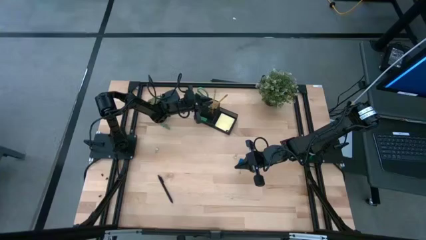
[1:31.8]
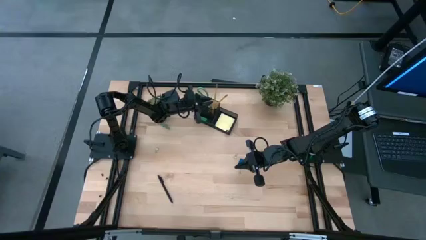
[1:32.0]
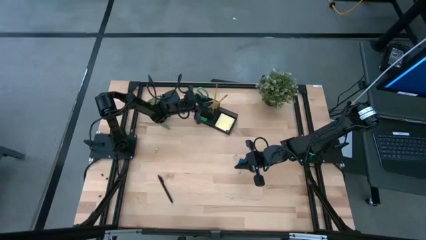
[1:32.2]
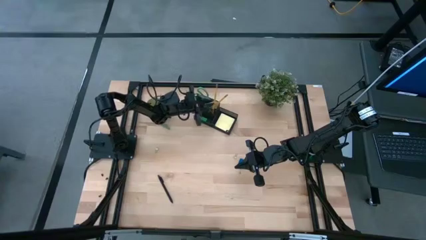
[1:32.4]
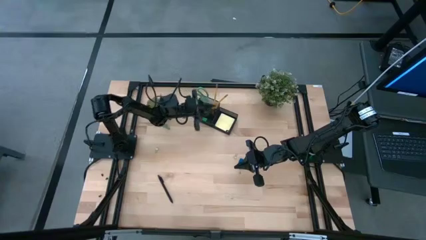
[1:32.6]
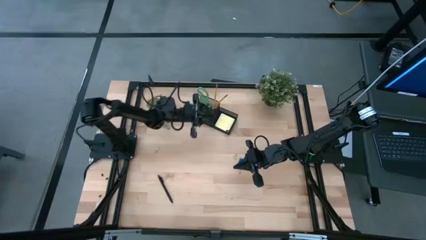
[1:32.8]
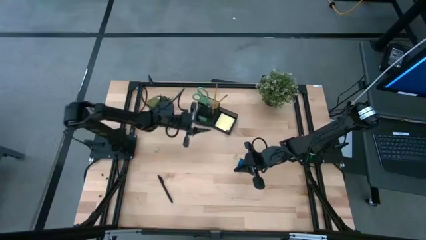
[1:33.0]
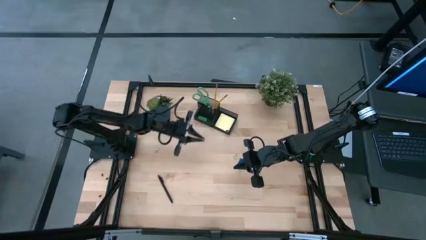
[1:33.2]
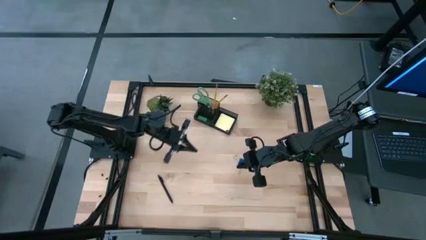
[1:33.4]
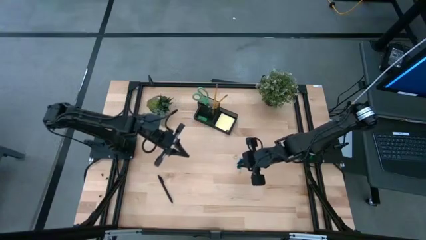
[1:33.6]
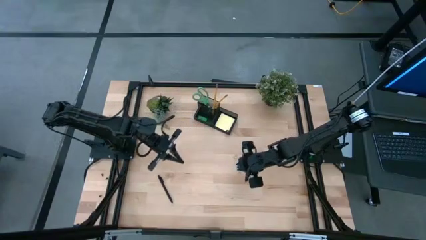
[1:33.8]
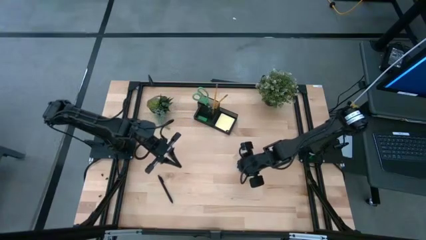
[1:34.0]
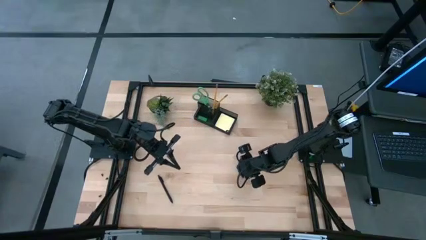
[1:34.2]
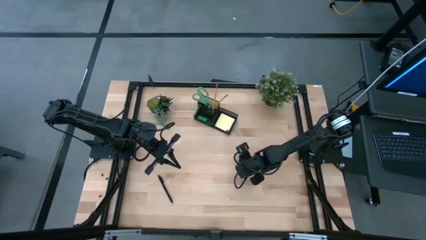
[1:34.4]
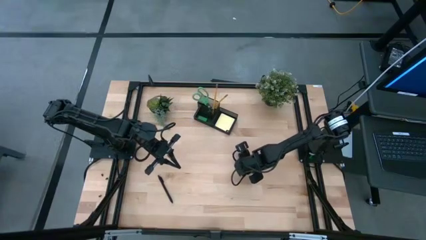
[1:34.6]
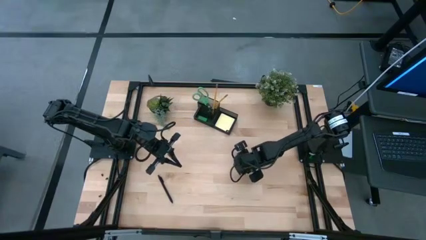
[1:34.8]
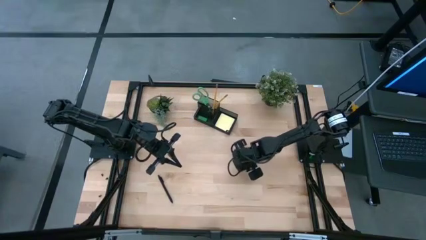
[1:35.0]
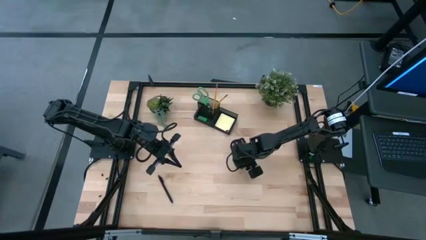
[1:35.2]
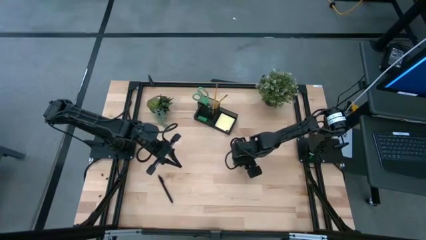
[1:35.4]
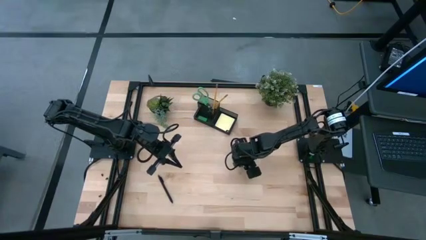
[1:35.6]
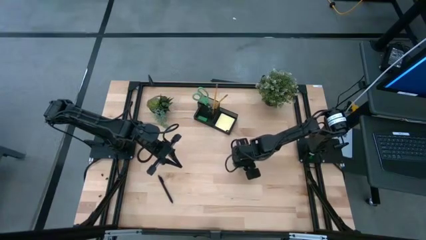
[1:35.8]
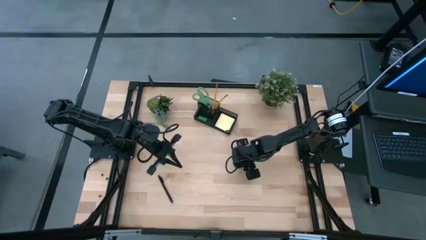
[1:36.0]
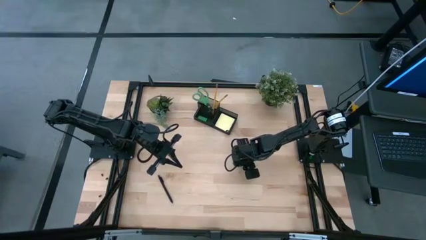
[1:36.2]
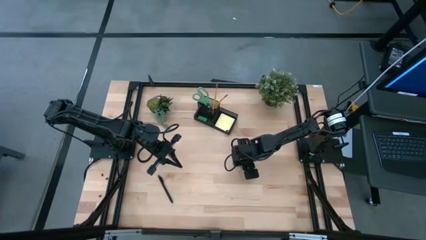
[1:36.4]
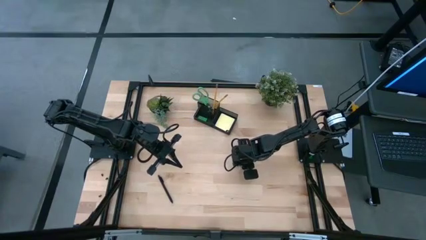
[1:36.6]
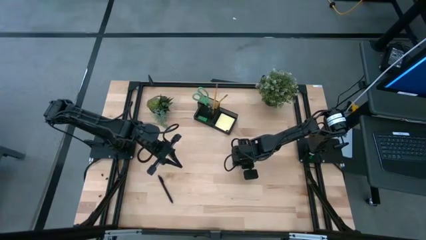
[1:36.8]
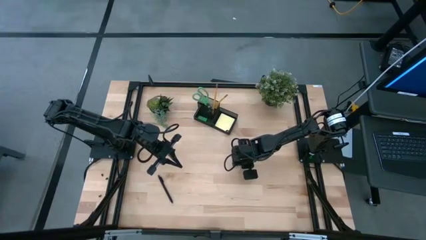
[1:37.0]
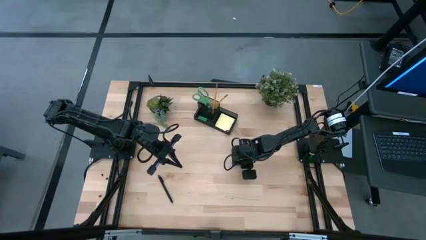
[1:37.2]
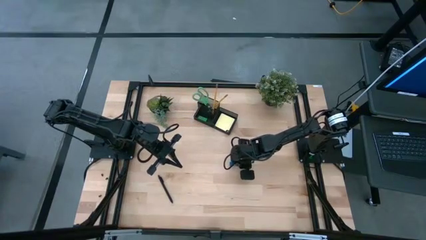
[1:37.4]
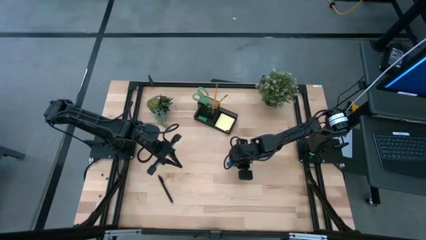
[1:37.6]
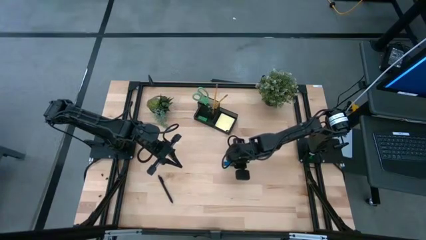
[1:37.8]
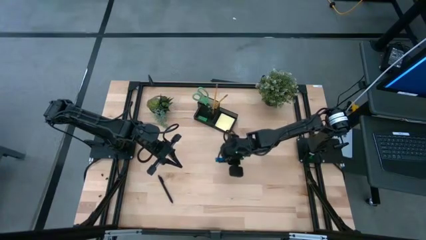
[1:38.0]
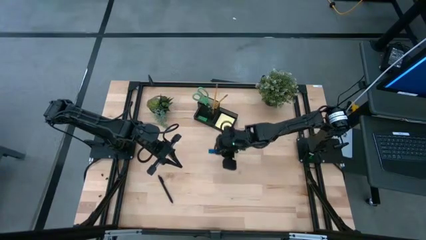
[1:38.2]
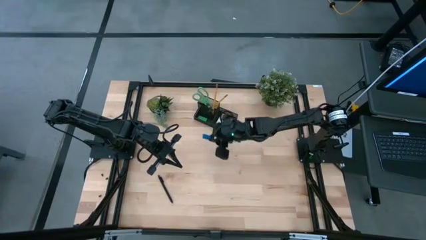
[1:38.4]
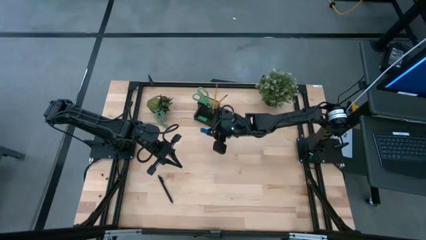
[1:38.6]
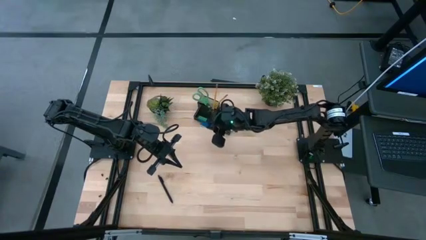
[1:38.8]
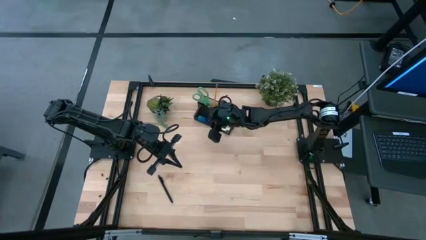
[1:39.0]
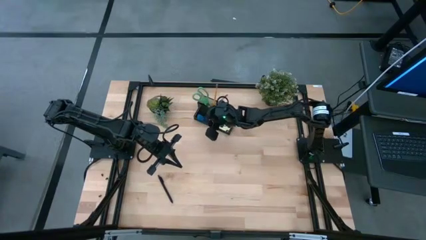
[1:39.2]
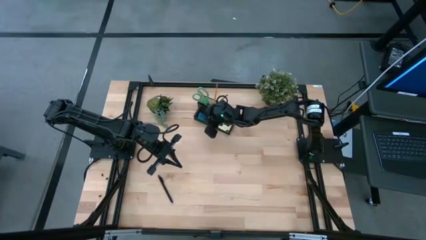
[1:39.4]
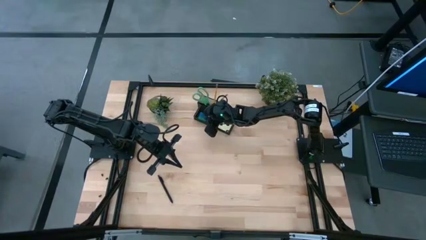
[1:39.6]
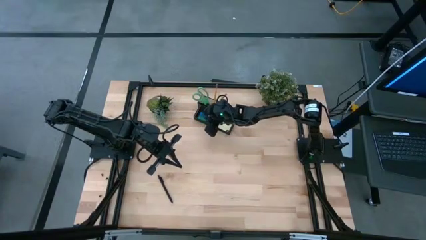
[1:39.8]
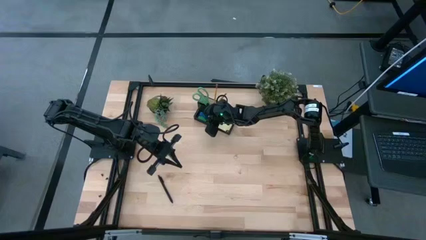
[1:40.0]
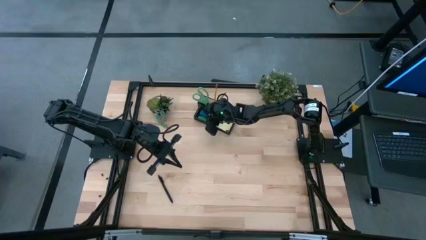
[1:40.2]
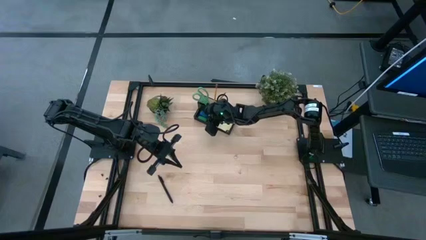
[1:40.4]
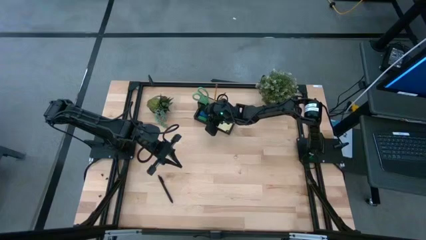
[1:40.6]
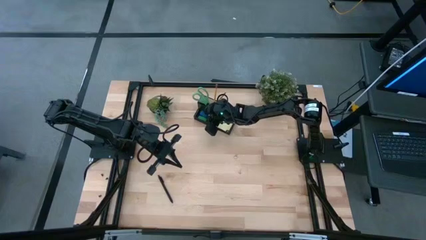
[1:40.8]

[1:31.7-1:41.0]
Task: Pick and place office supplies into organizer
Put the blue eraser into the desk organizer

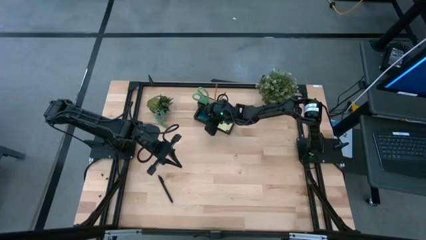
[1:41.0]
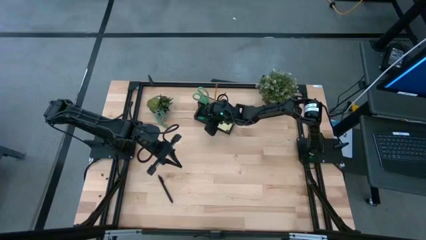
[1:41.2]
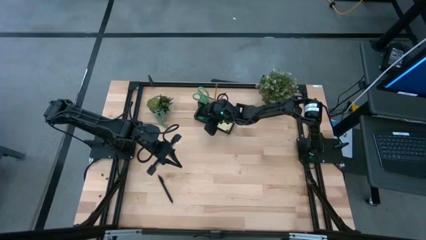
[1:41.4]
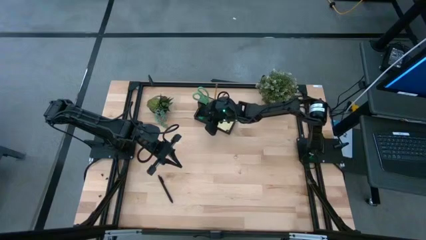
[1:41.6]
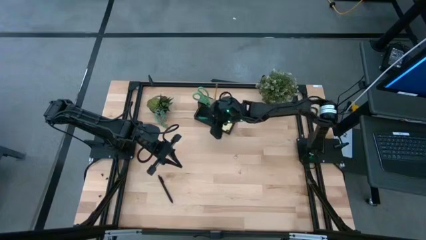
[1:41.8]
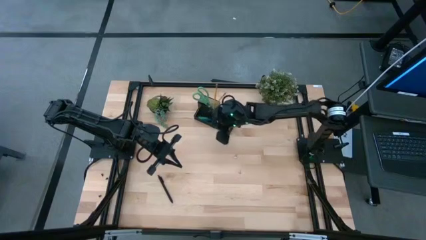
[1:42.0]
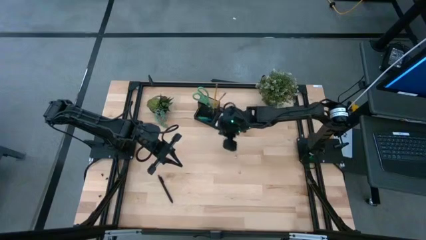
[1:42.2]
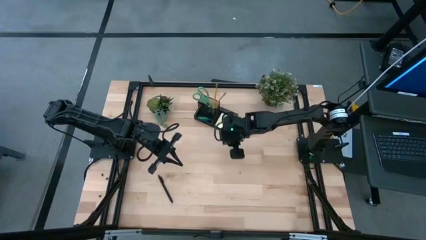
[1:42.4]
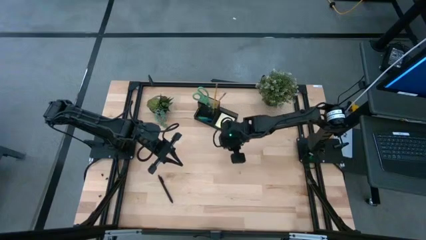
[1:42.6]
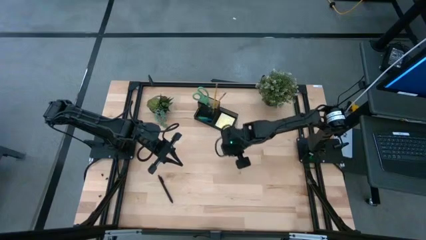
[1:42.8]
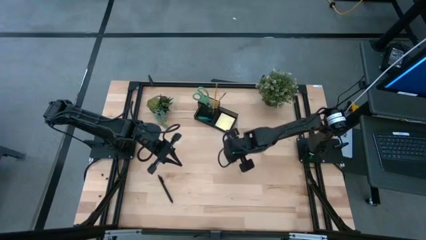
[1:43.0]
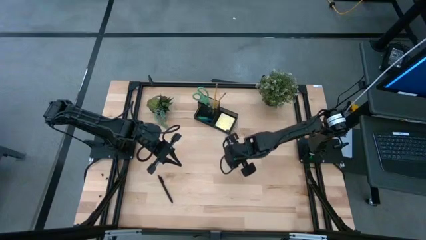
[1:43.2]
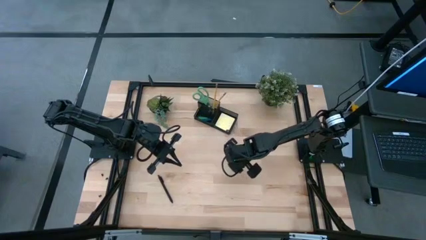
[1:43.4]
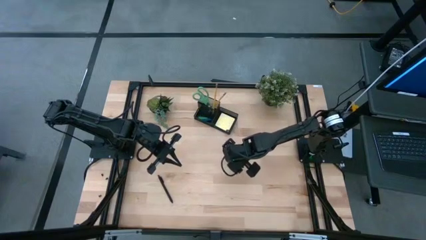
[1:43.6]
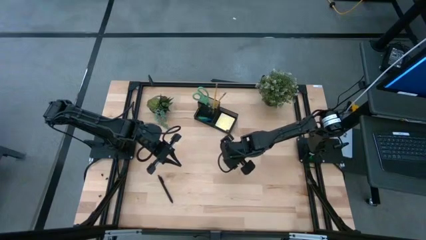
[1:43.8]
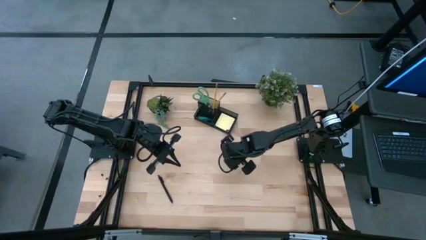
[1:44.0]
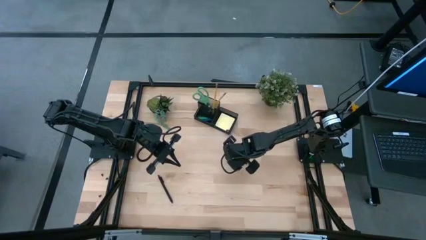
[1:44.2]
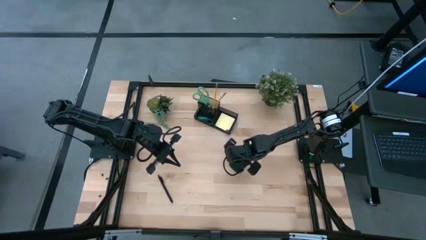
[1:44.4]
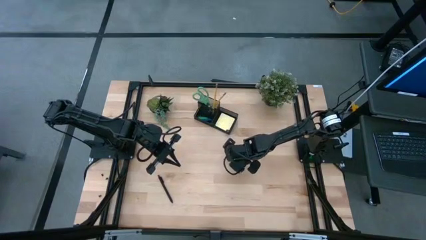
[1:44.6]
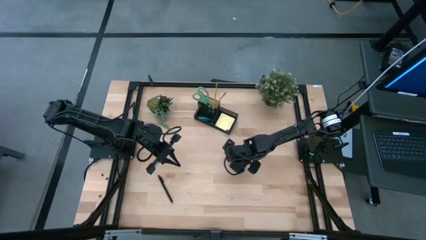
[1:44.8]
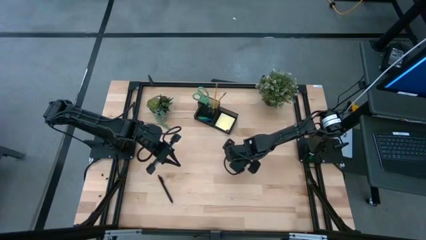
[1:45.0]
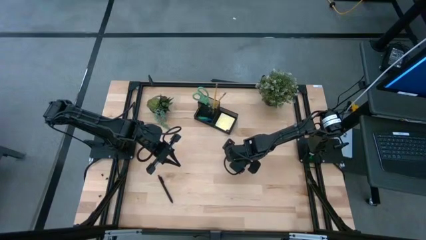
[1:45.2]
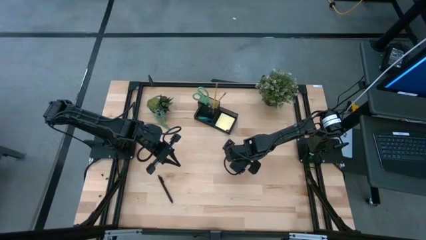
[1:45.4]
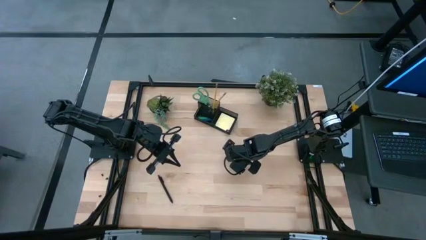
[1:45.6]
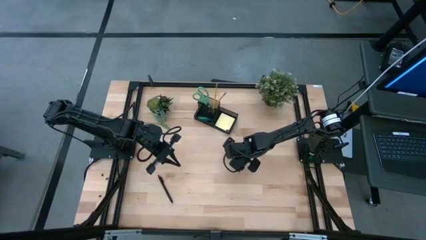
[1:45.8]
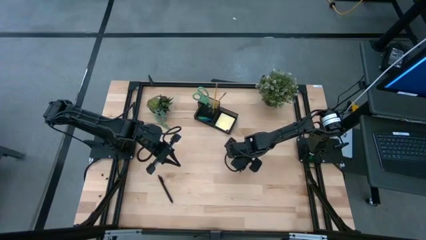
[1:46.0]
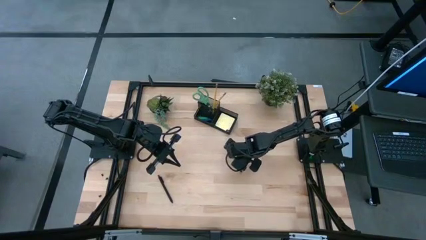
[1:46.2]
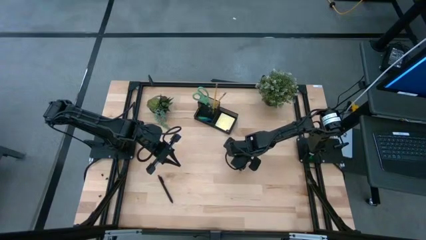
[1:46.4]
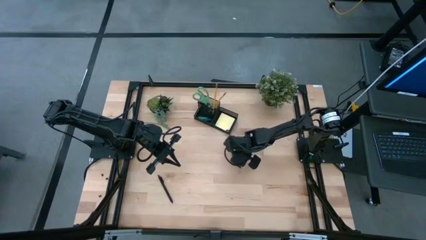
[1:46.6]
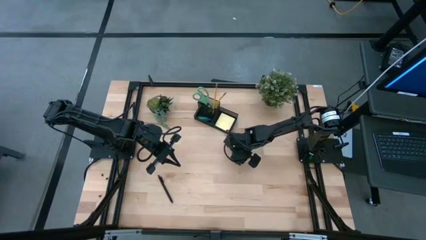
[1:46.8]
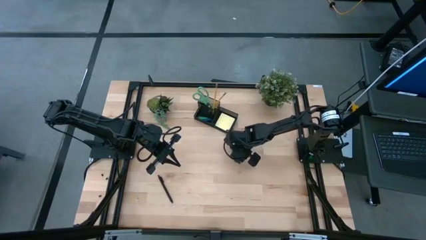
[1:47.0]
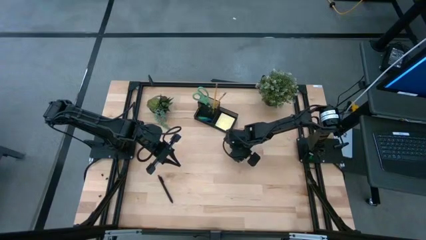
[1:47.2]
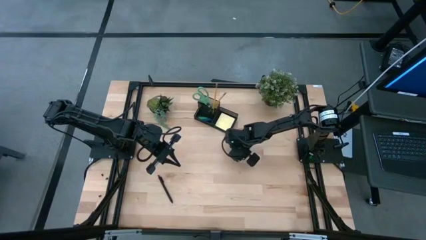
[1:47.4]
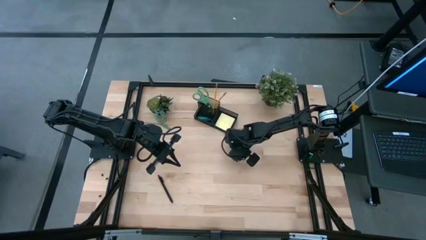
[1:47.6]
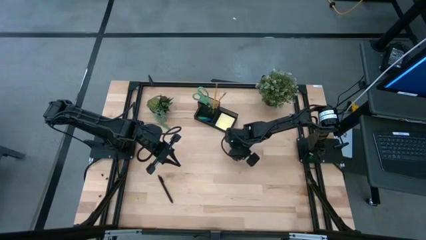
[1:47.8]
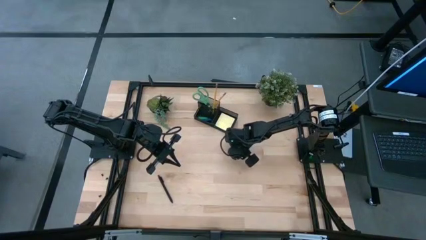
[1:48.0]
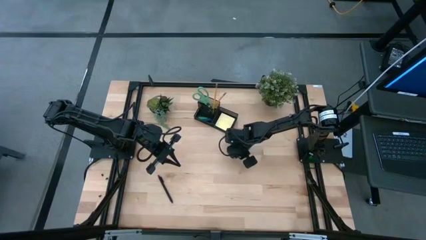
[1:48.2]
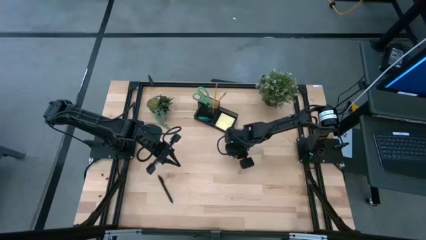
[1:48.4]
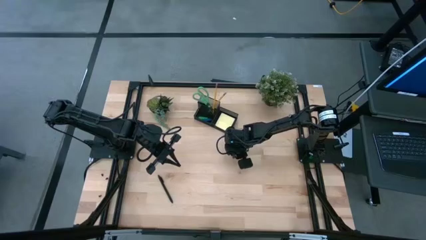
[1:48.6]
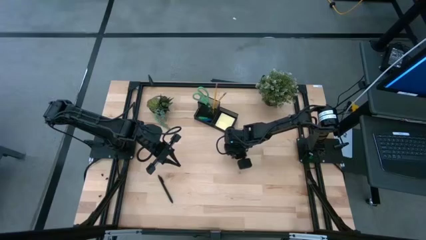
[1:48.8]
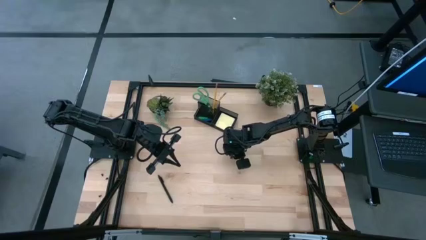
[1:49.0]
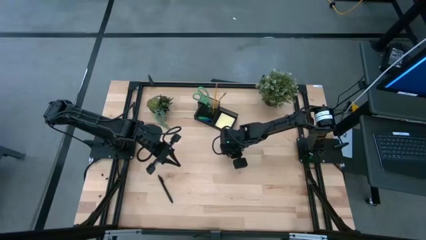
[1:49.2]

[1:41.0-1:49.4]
Put the right binder clip into the desk organizer
